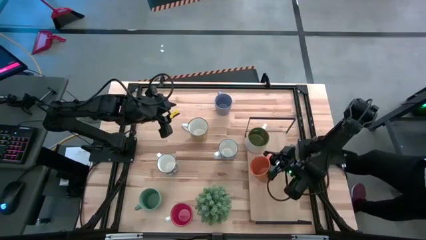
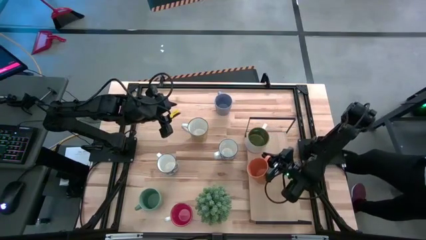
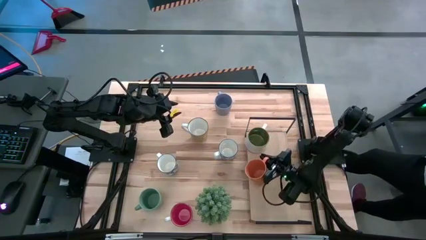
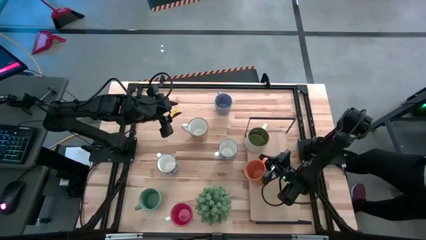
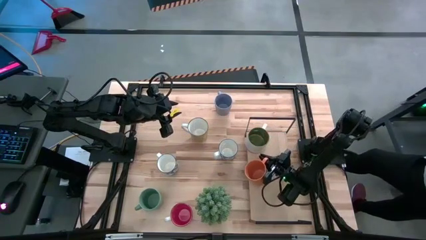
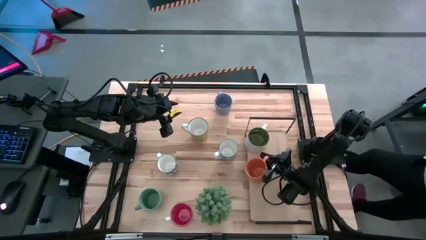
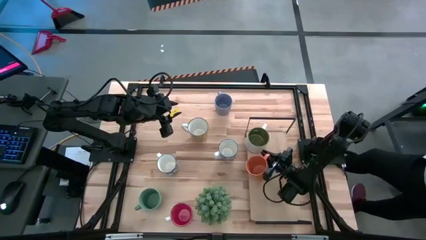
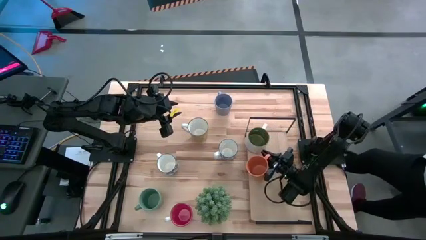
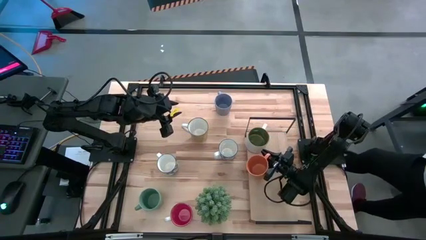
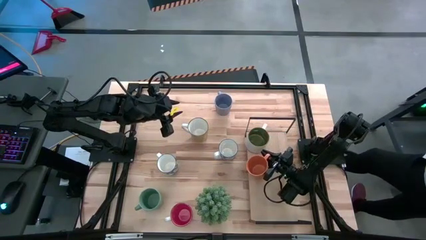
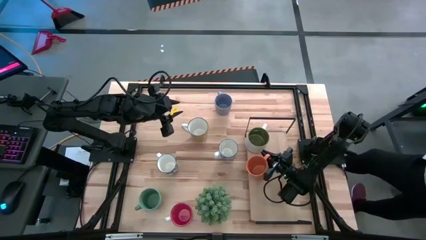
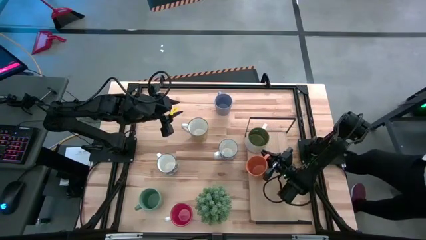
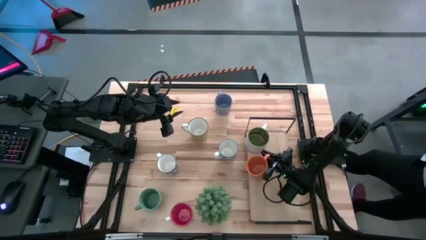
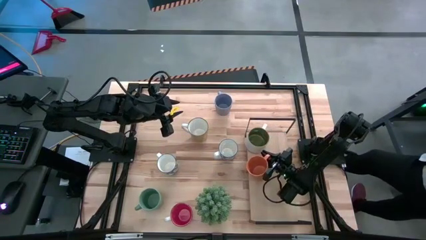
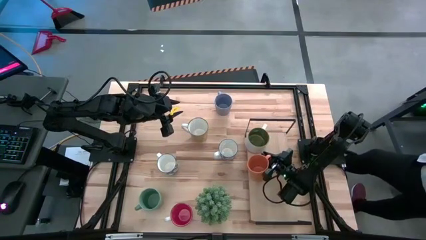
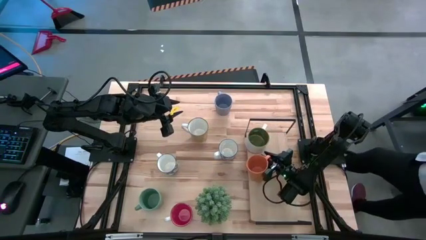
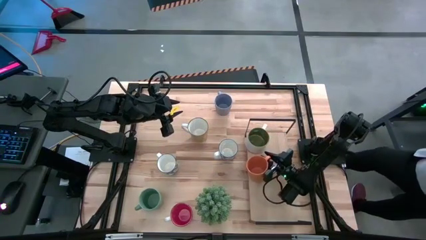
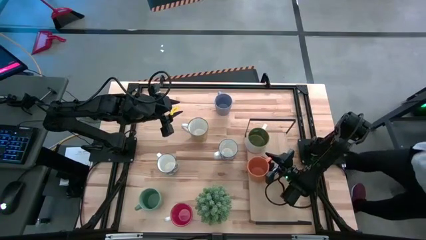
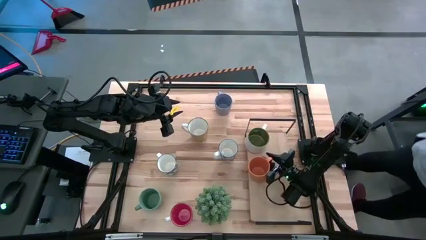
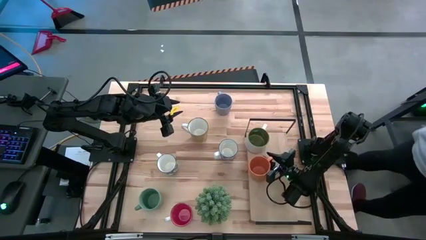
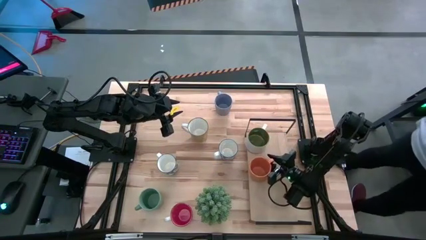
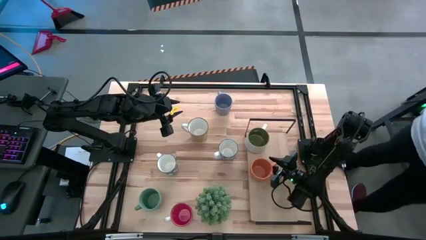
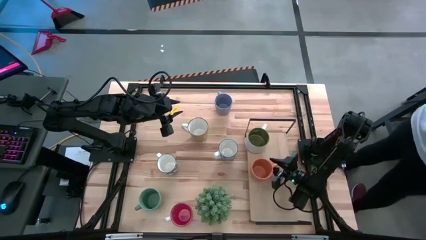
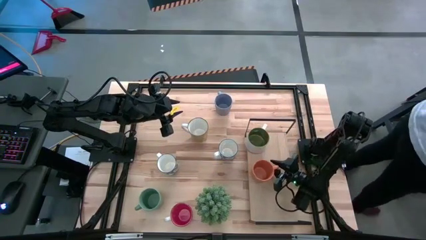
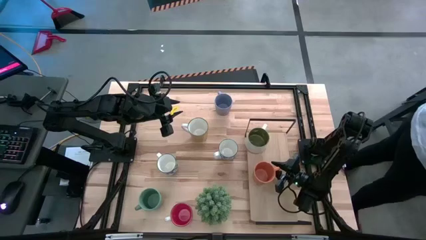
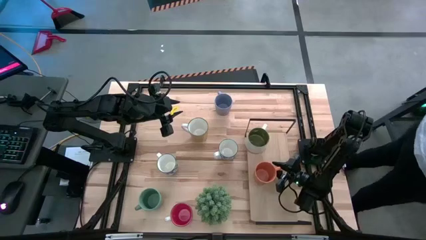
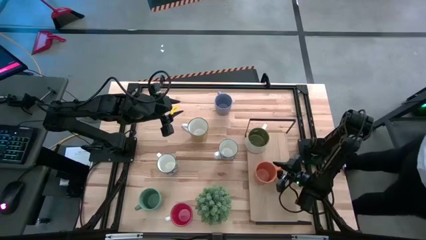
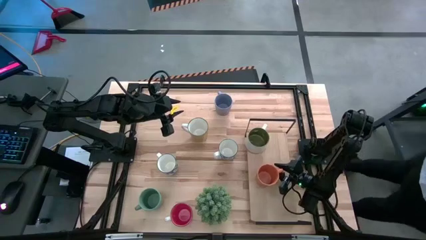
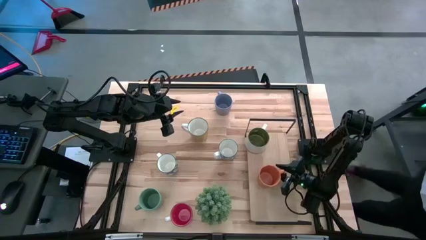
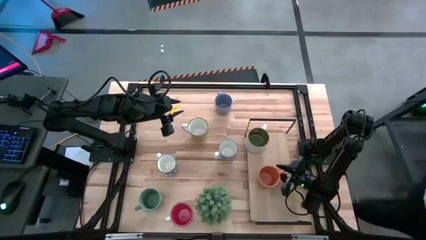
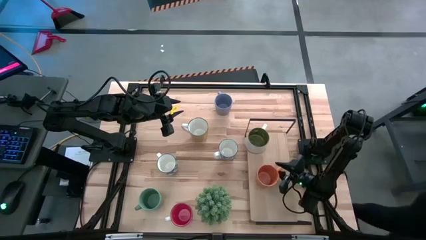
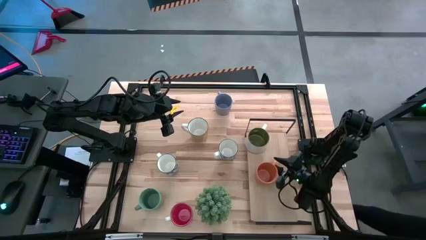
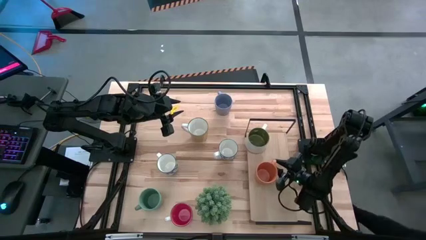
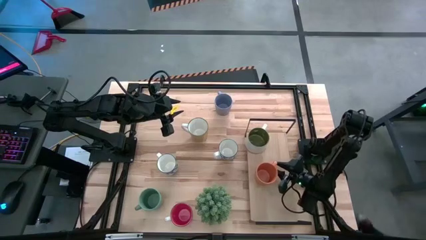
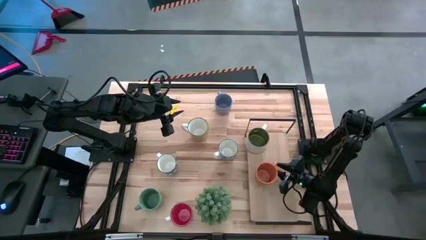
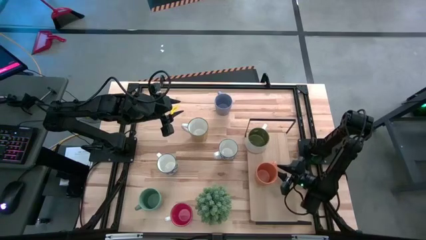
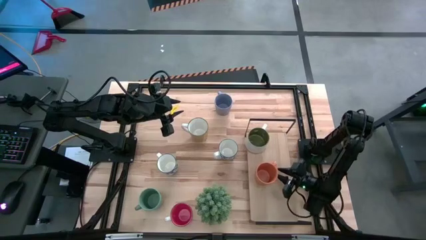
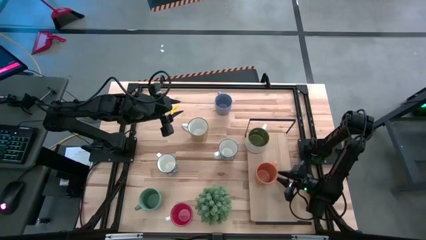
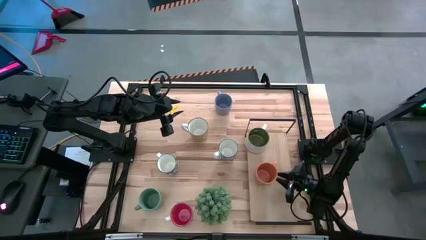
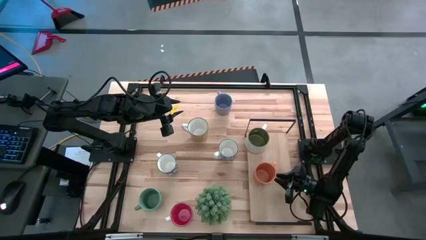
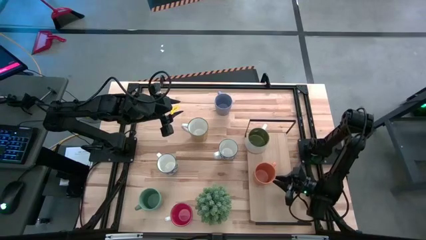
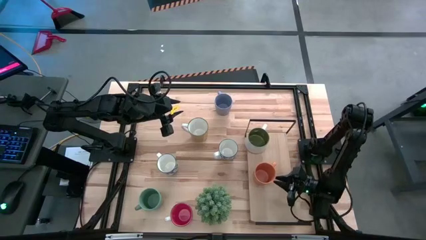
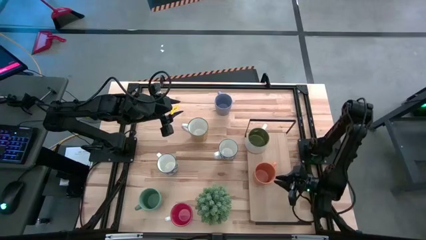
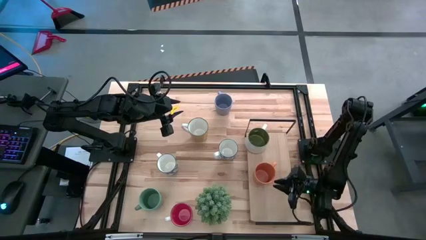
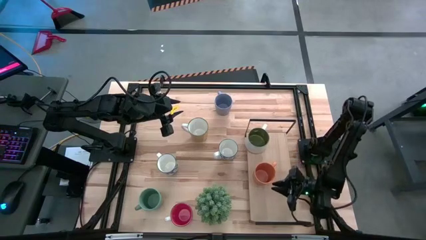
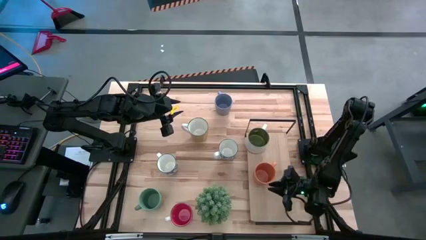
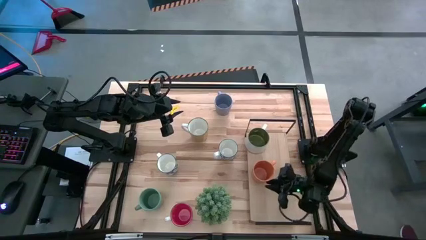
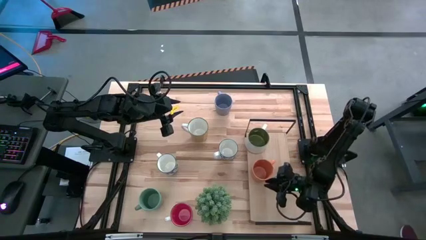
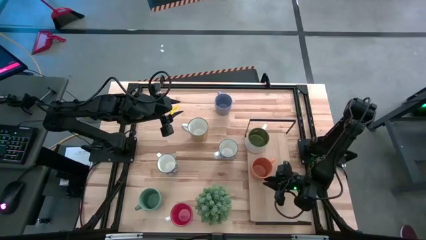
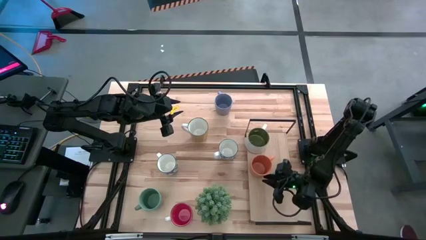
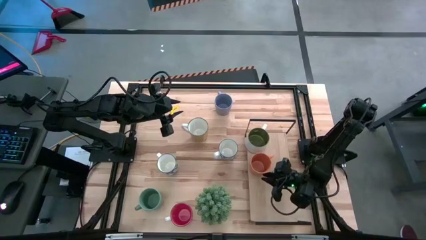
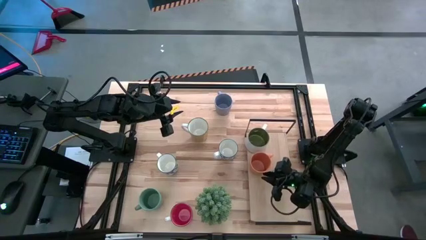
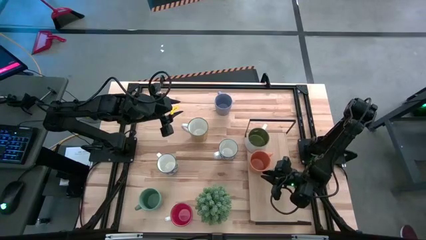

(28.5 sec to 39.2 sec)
Task: Place coffee mugs
Put the orange mug on the shelf
